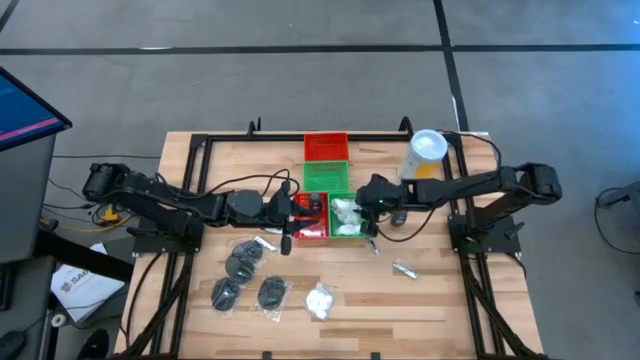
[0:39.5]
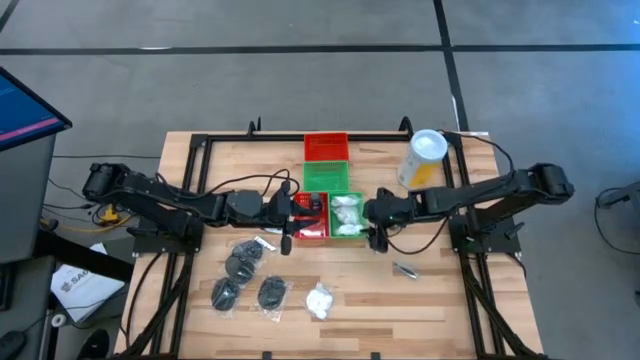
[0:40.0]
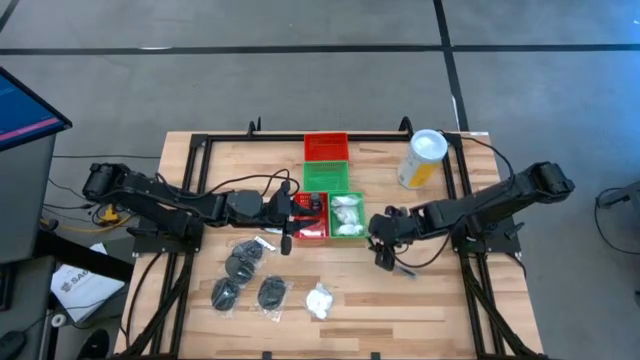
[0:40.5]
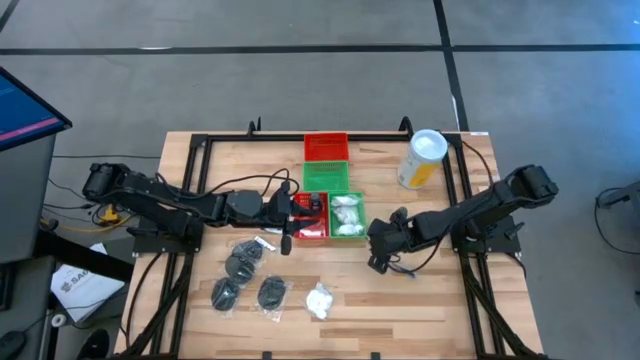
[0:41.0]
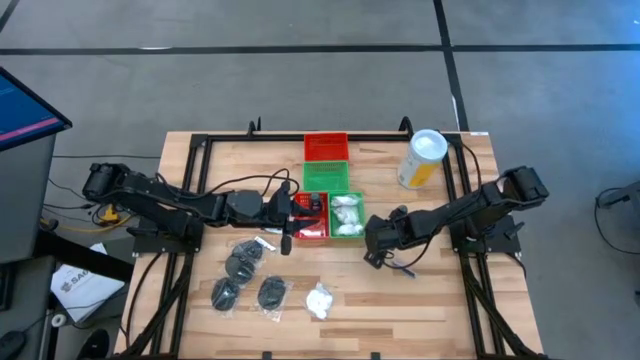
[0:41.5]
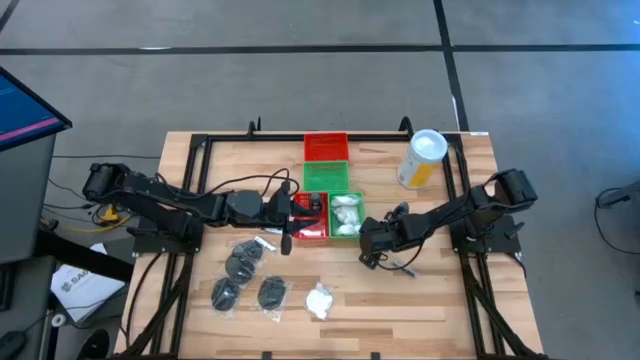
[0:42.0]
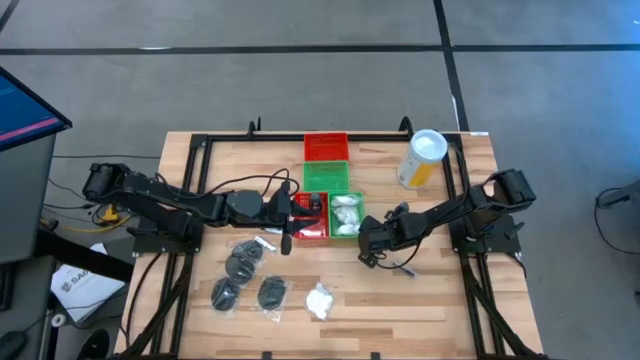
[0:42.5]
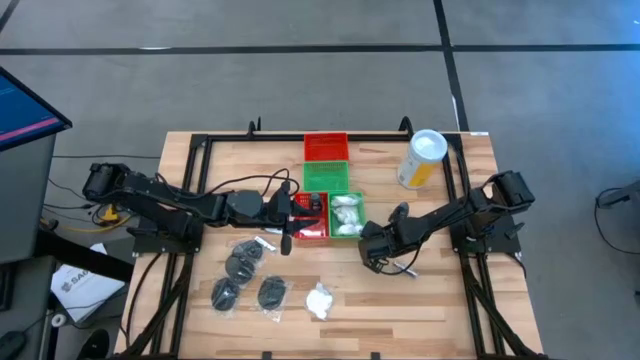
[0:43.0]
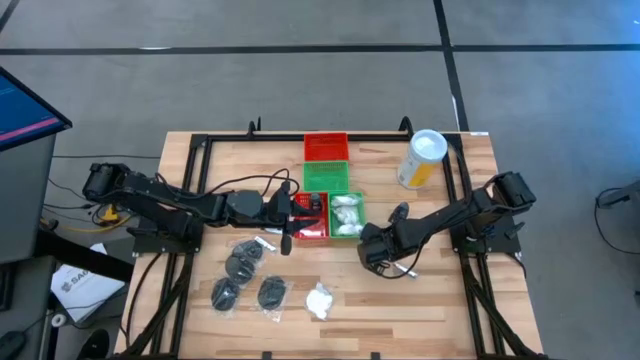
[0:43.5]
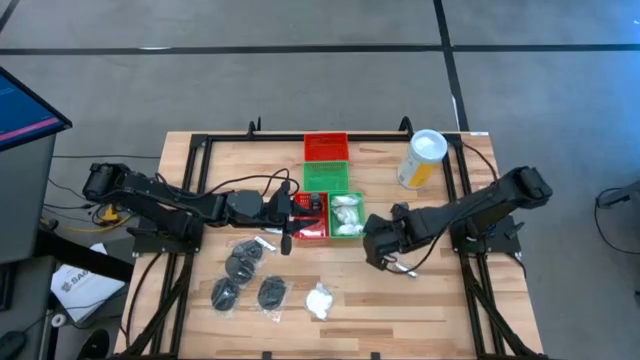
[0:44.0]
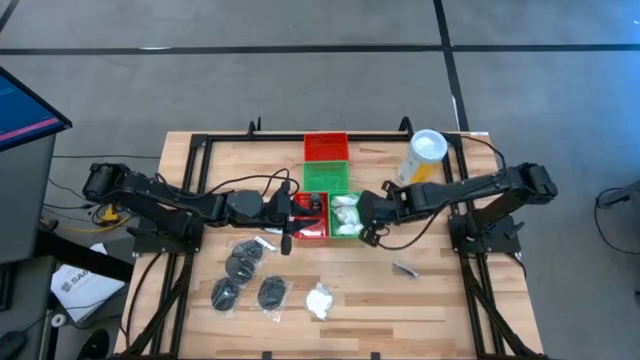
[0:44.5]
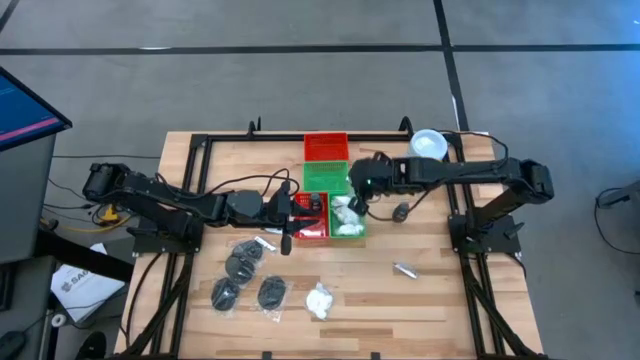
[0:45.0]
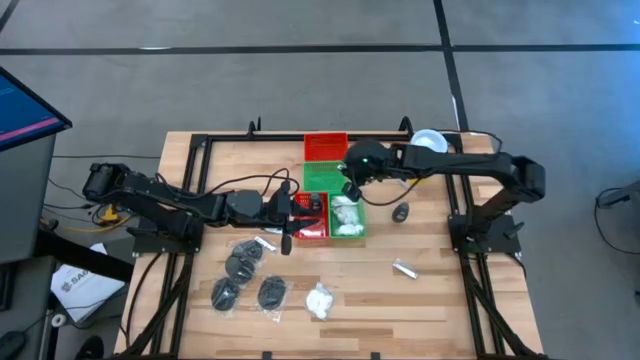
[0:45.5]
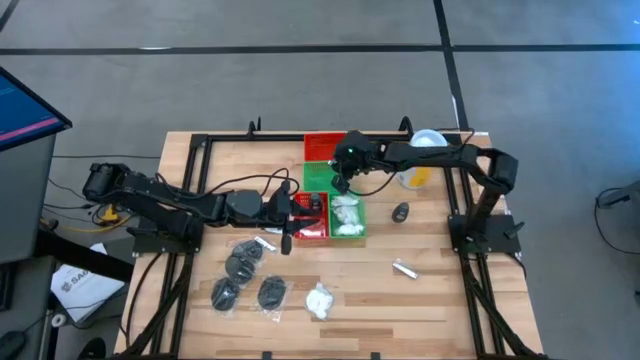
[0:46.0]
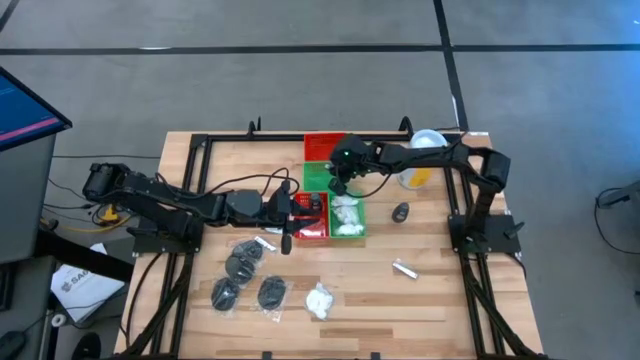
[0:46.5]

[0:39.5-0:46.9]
Task: Pick & Place Travel size toiletries
Put the silver nail cutter into the top green bin

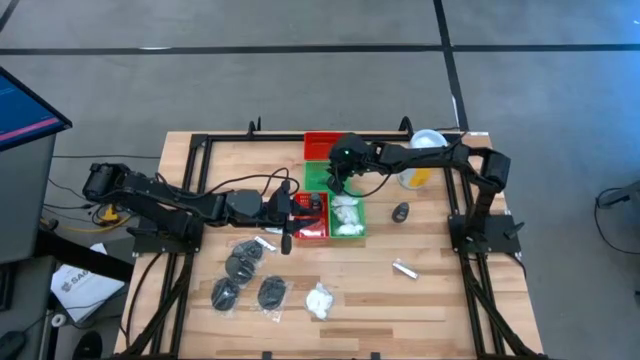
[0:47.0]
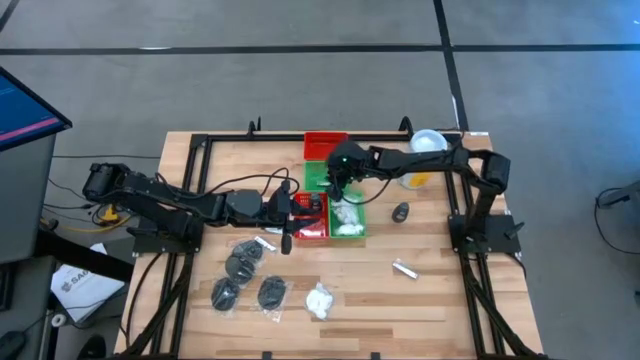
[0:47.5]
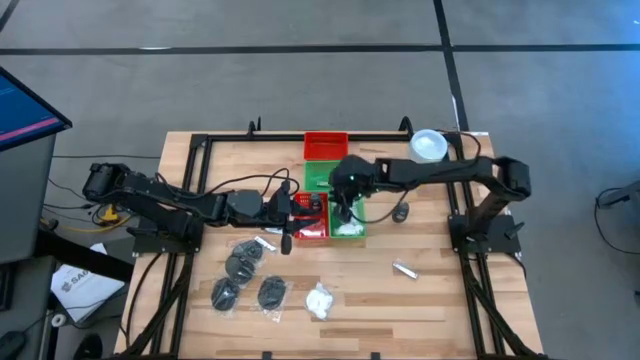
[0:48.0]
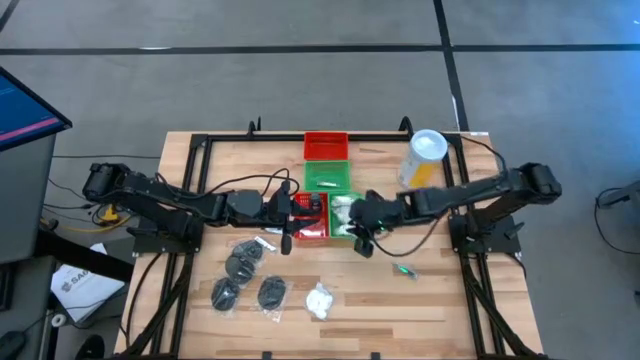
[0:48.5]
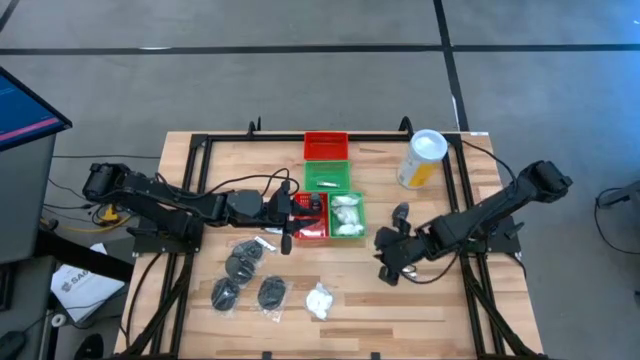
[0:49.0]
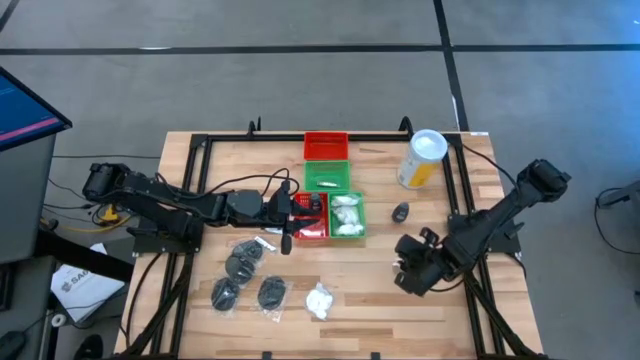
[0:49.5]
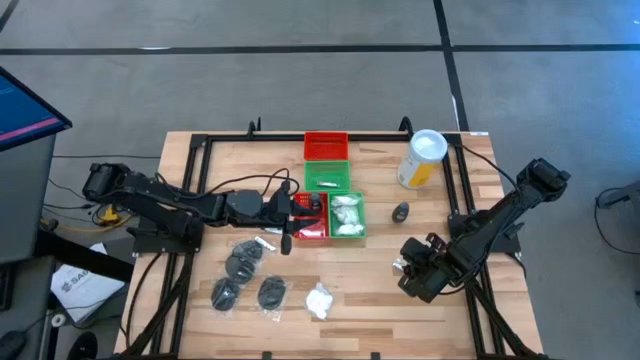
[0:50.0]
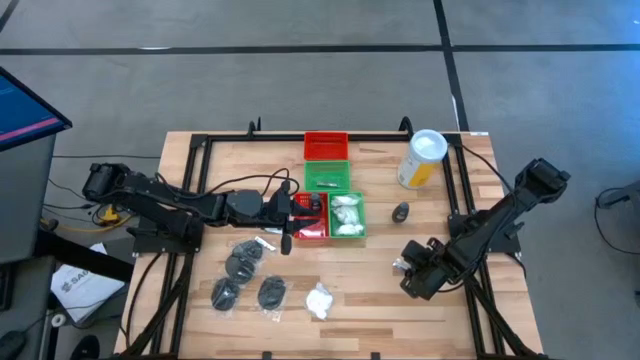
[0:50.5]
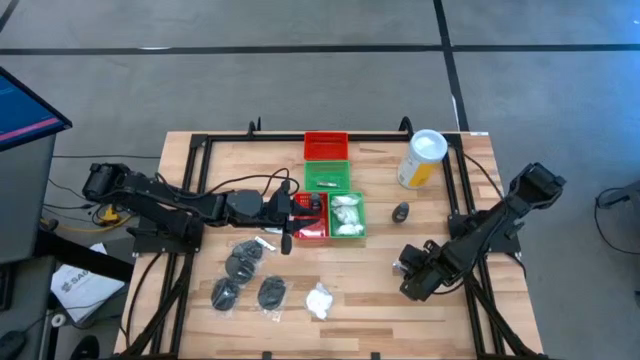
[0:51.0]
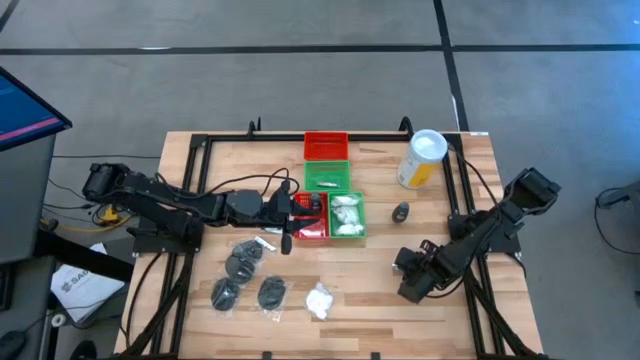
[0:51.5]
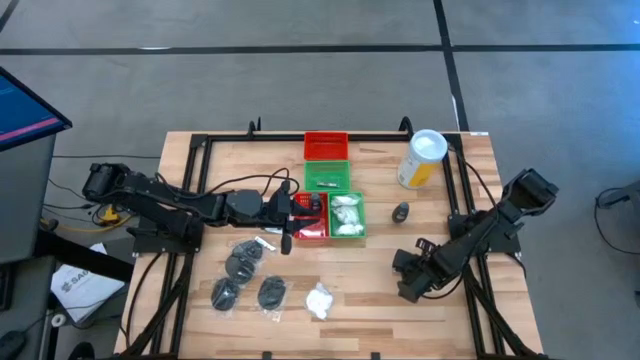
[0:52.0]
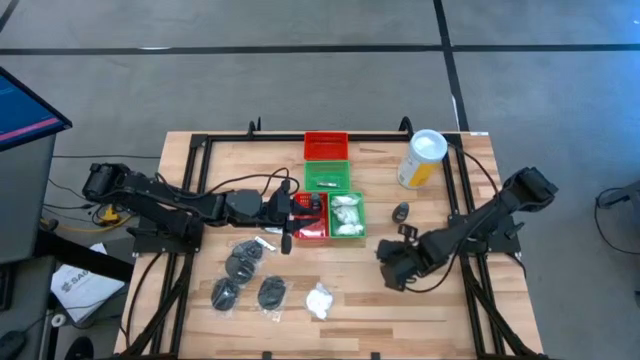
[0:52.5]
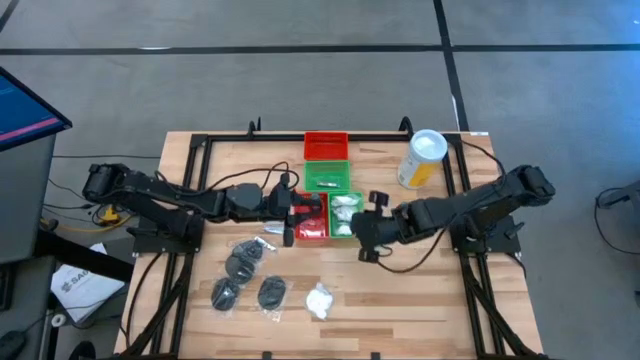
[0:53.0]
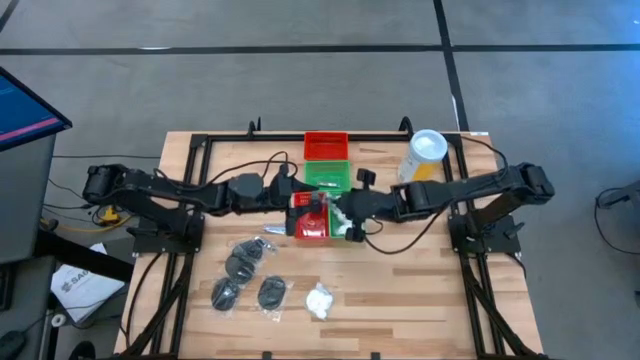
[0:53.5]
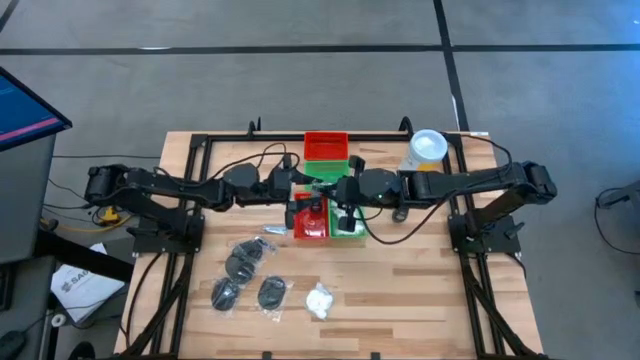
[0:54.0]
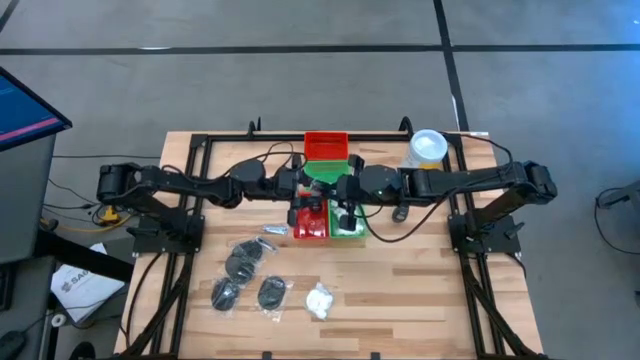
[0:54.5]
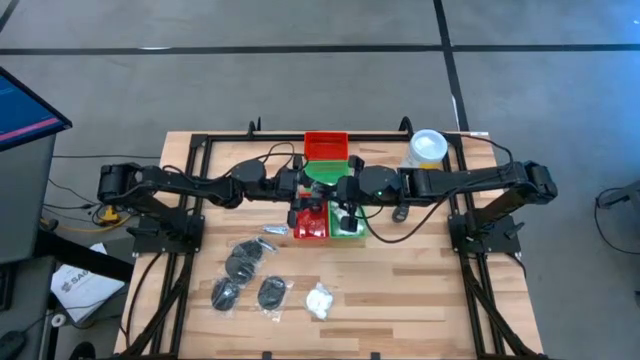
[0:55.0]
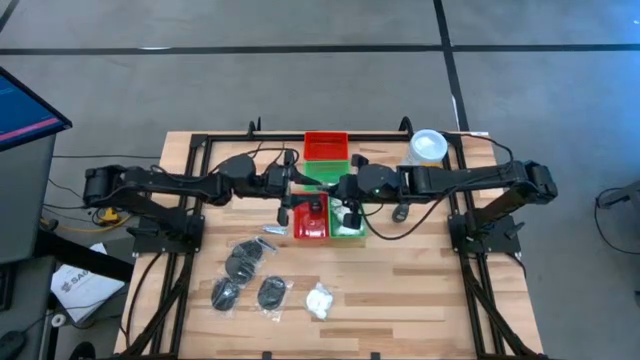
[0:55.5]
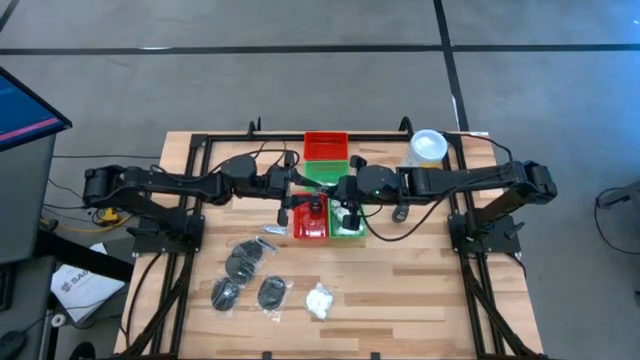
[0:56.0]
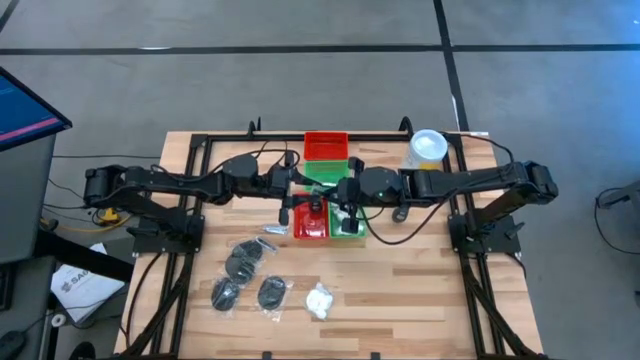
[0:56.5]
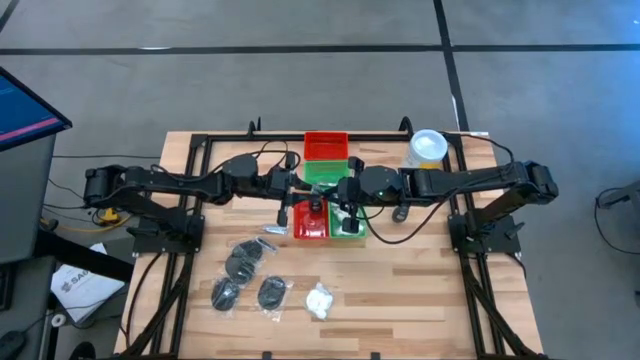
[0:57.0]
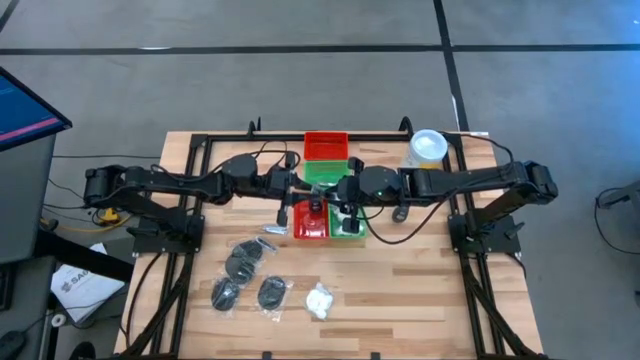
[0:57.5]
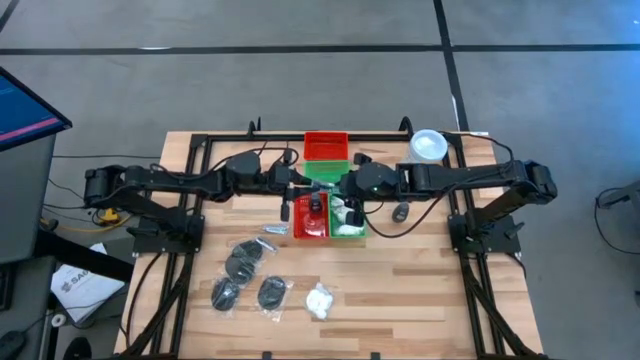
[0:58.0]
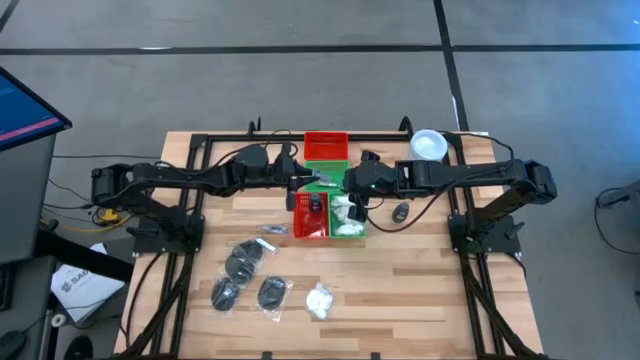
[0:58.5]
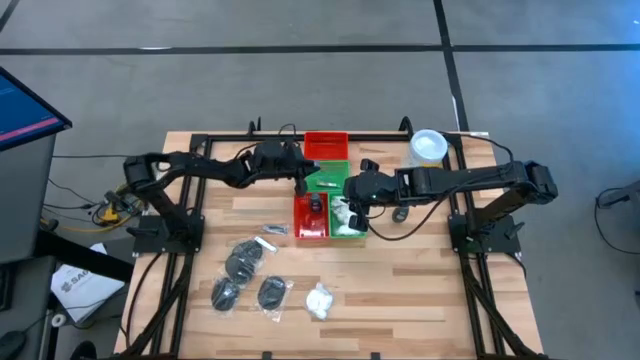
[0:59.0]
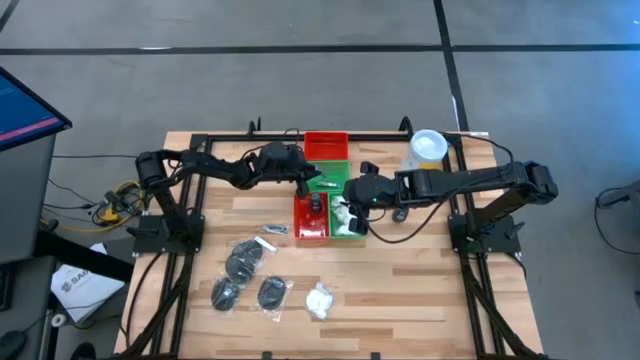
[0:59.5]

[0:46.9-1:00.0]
Put the silver nail cutter into the top green bin

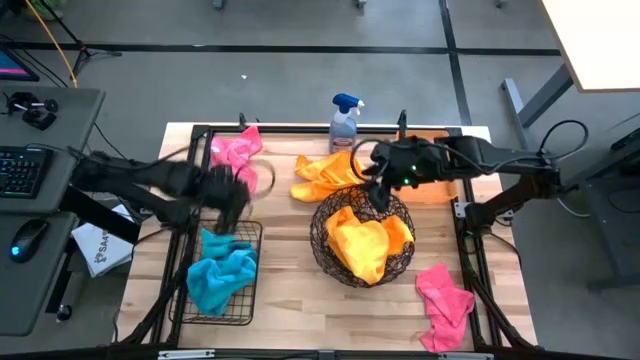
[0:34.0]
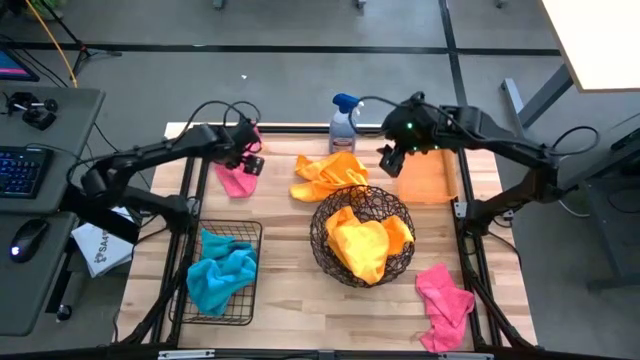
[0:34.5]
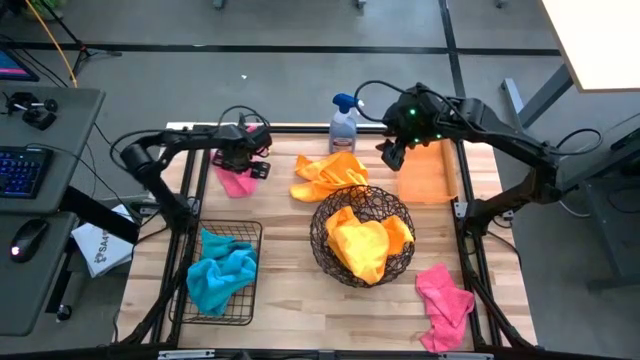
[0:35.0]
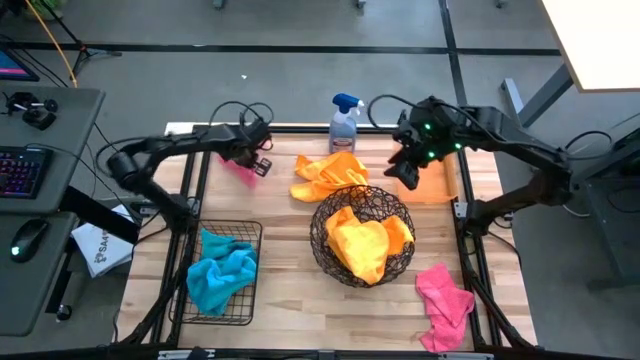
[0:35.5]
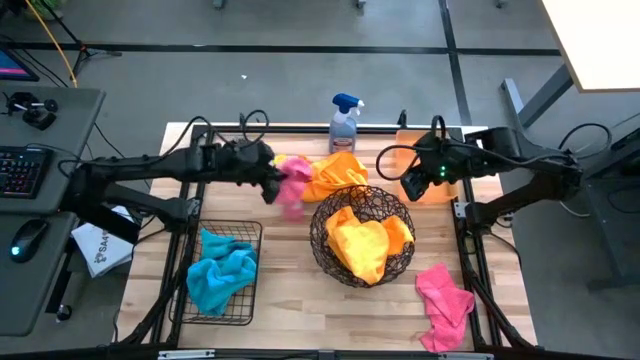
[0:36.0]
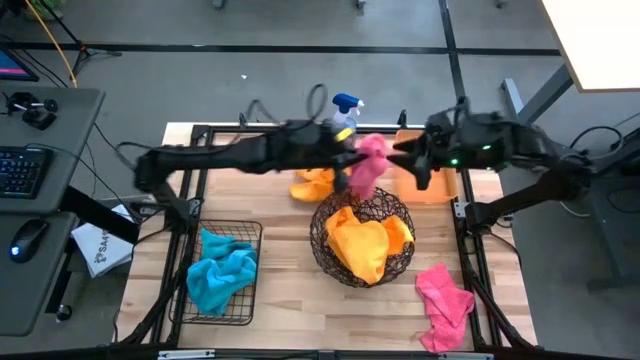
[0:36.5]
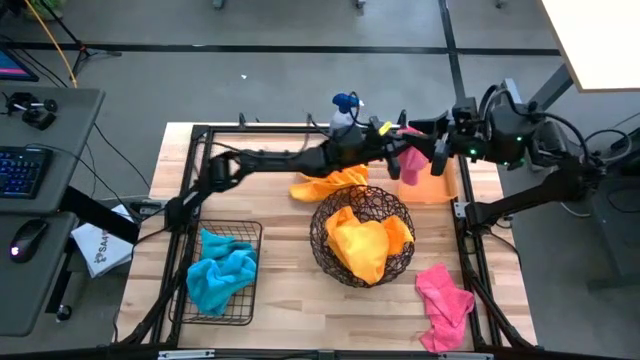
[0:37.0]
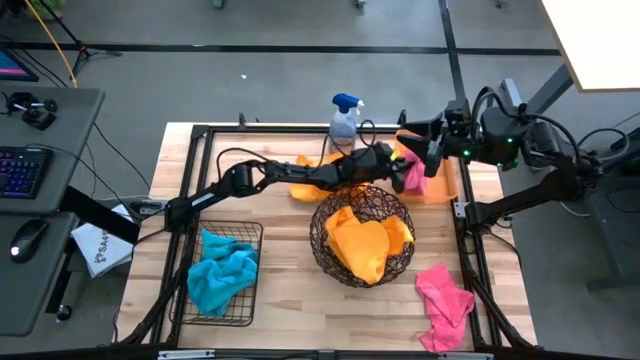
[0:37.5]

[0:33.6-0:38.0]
Task: Sort microfiber towel by color & place in baskets
Put the top pink microfiber towel into the orange bin
